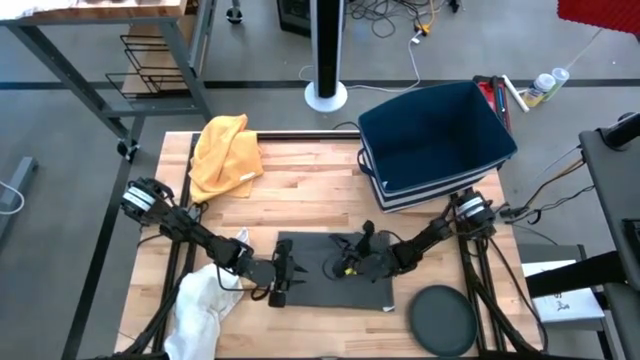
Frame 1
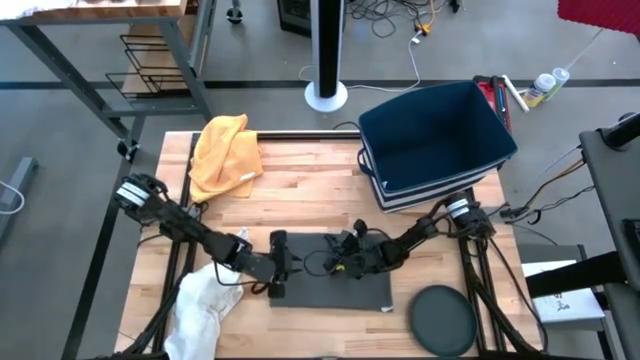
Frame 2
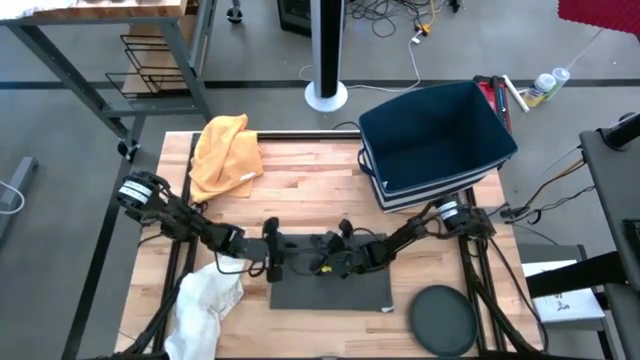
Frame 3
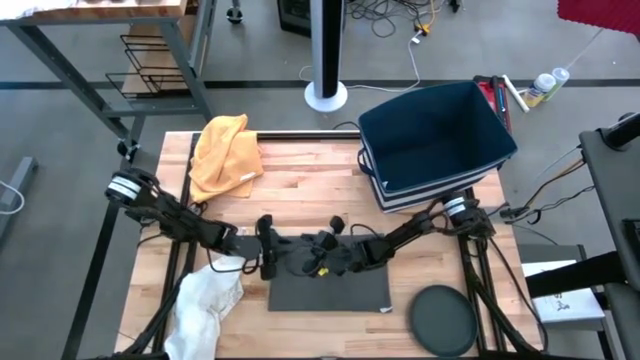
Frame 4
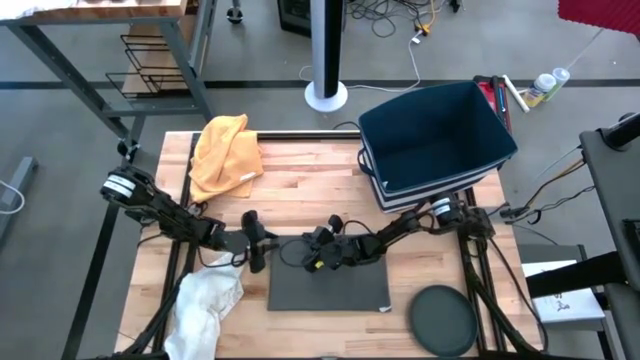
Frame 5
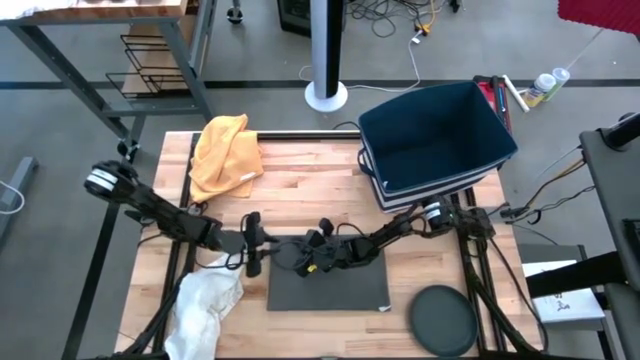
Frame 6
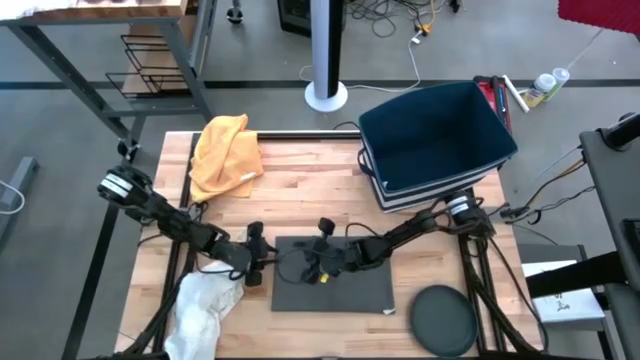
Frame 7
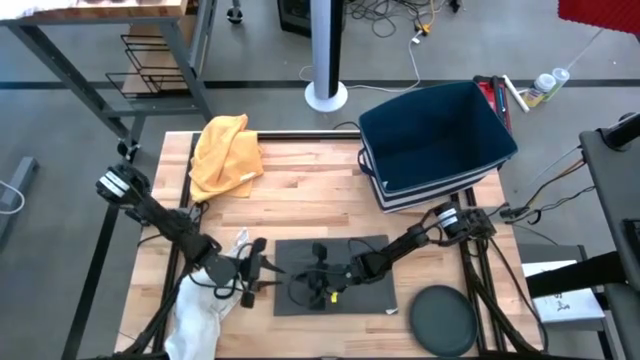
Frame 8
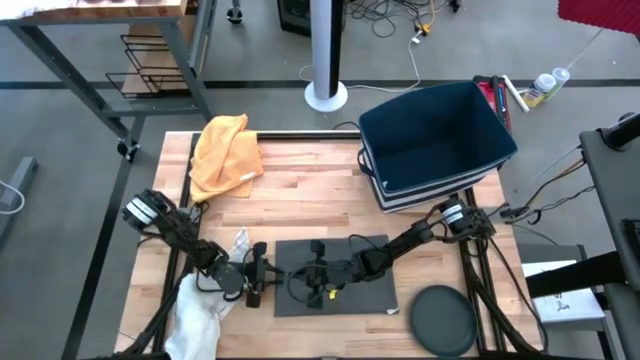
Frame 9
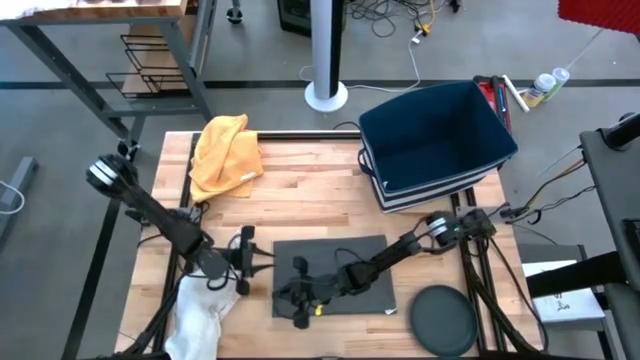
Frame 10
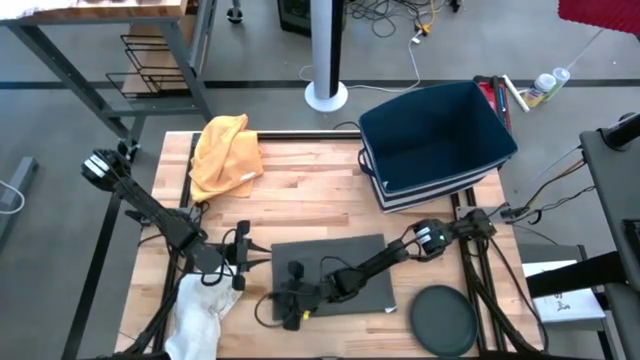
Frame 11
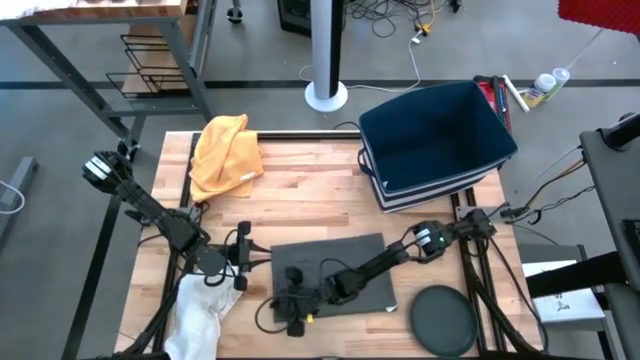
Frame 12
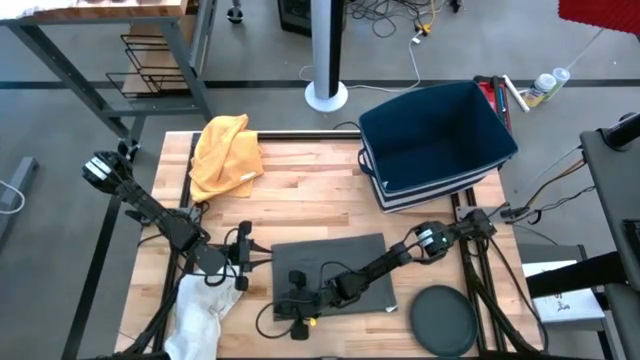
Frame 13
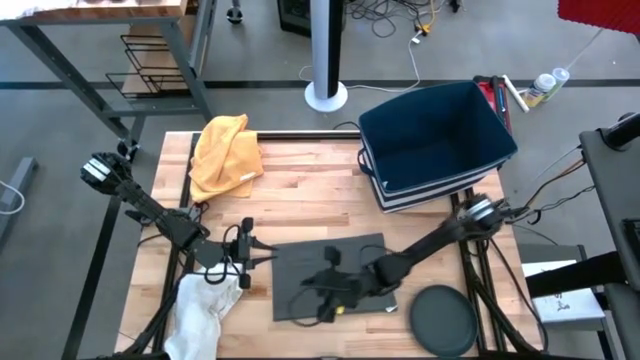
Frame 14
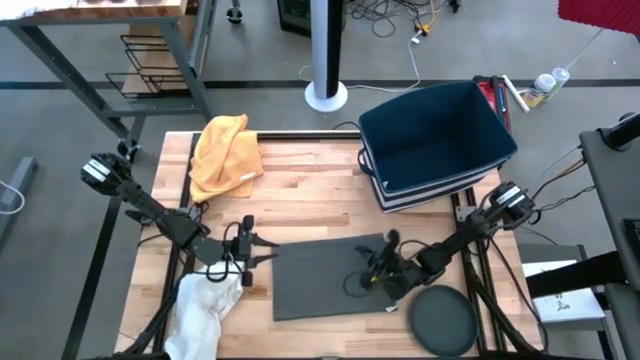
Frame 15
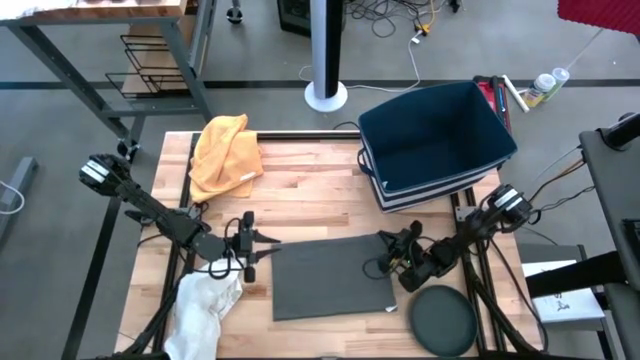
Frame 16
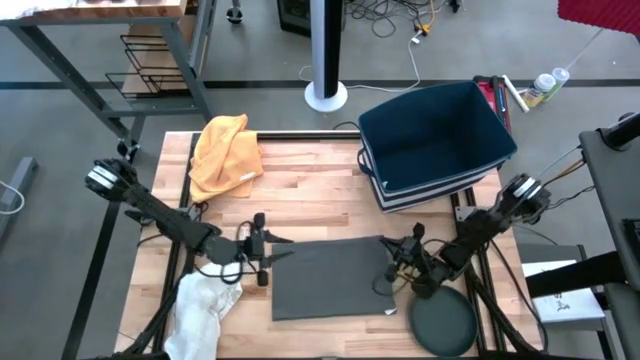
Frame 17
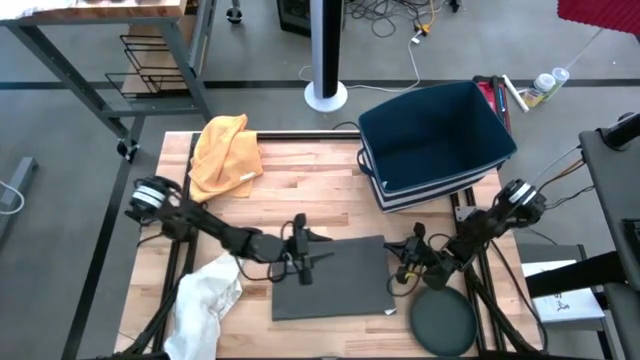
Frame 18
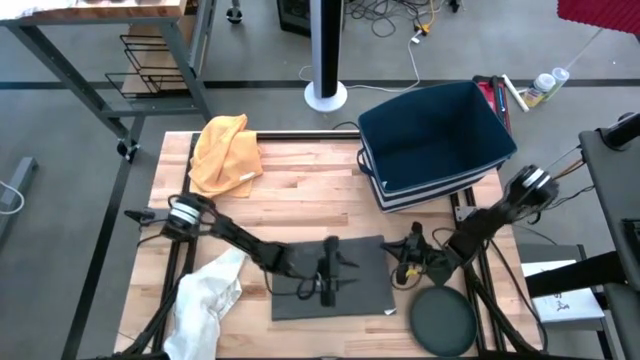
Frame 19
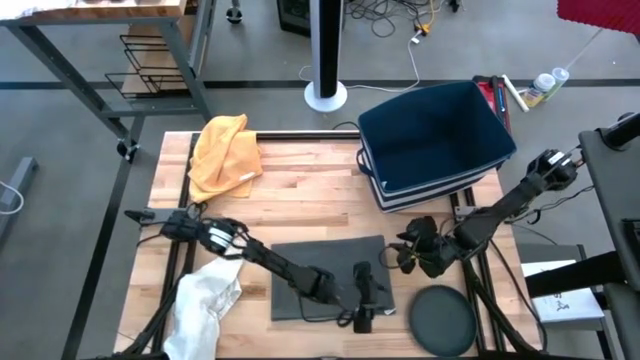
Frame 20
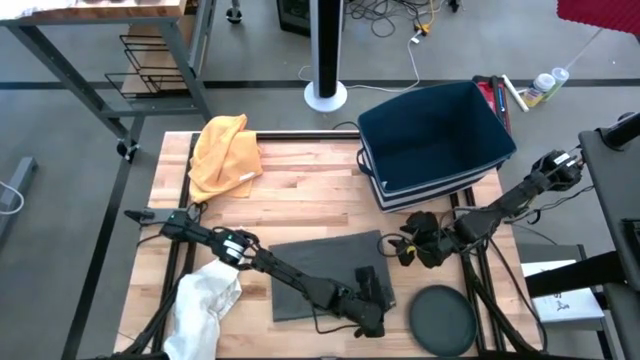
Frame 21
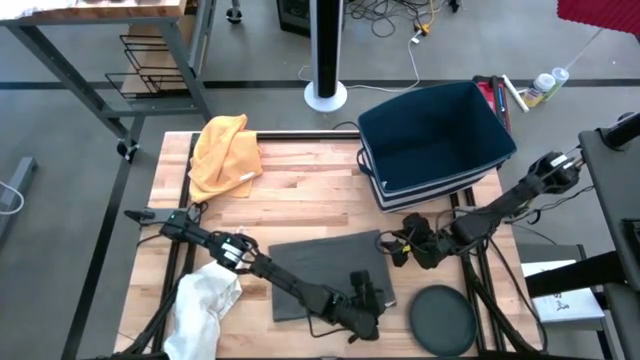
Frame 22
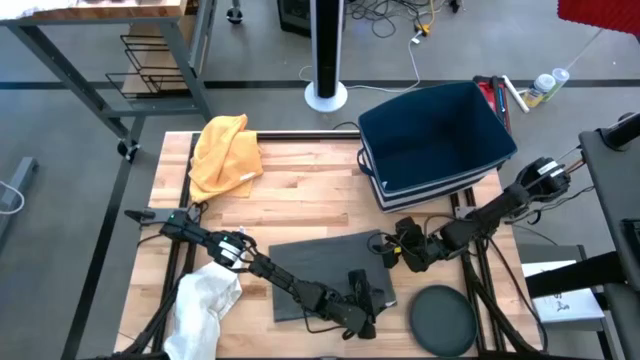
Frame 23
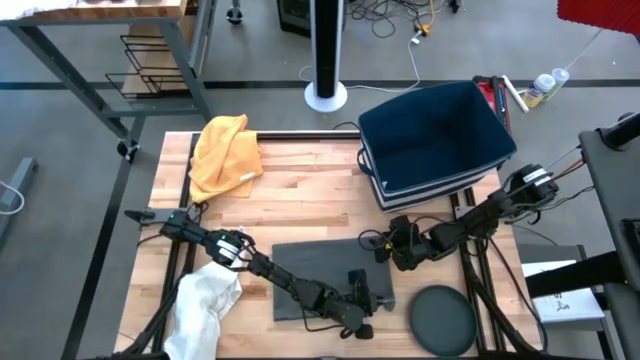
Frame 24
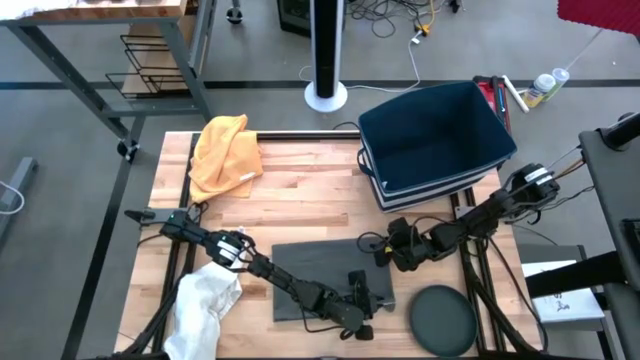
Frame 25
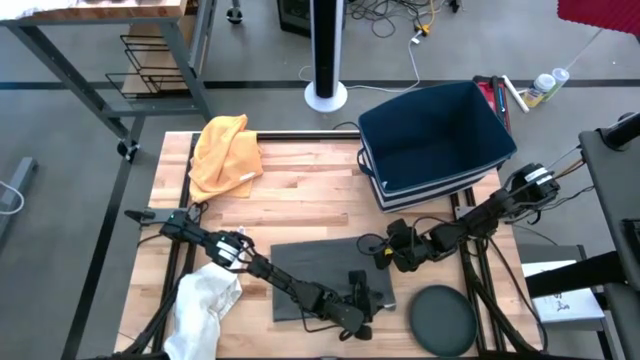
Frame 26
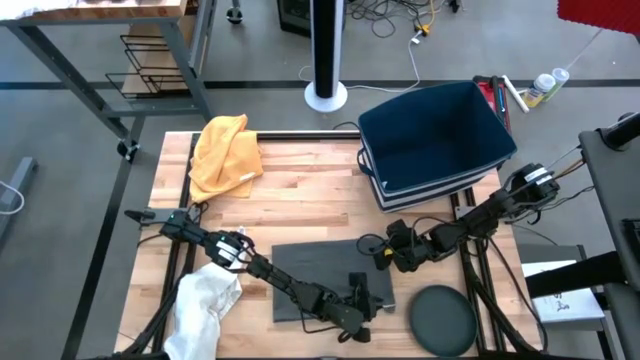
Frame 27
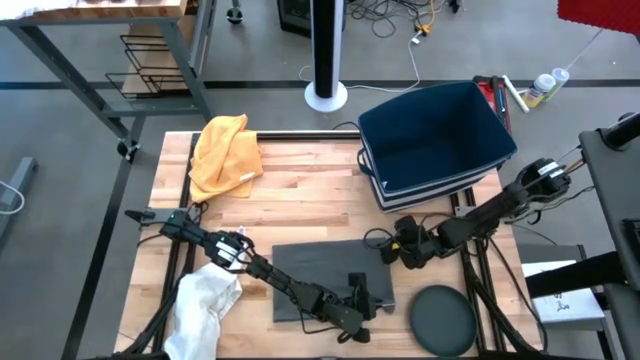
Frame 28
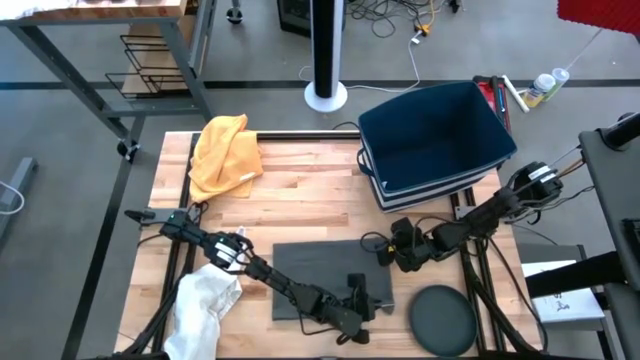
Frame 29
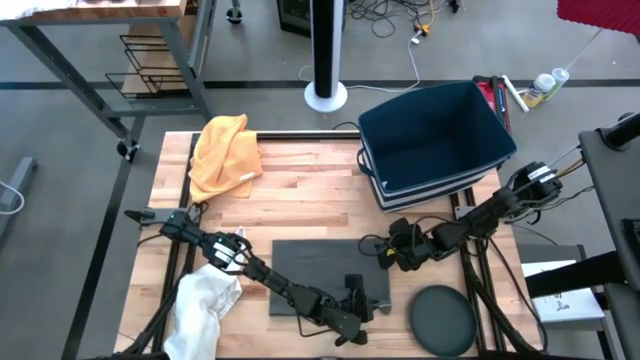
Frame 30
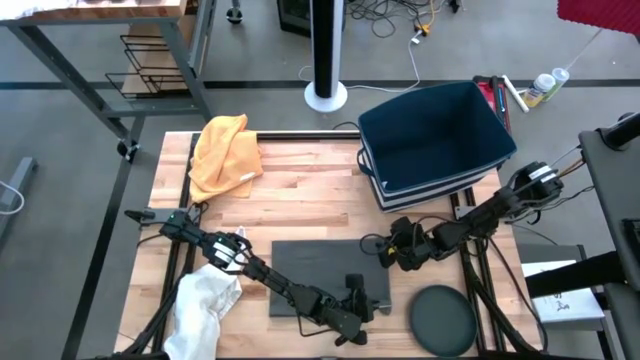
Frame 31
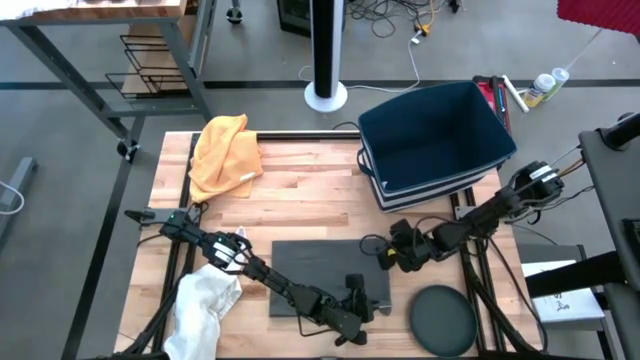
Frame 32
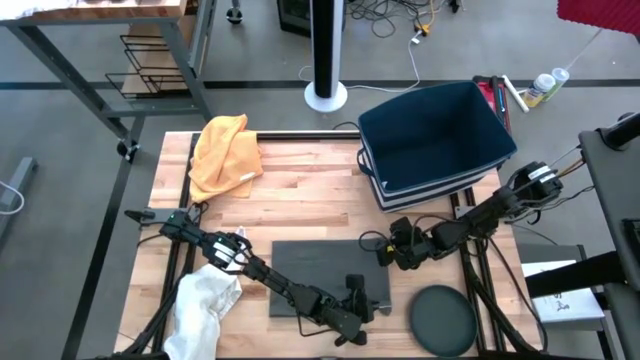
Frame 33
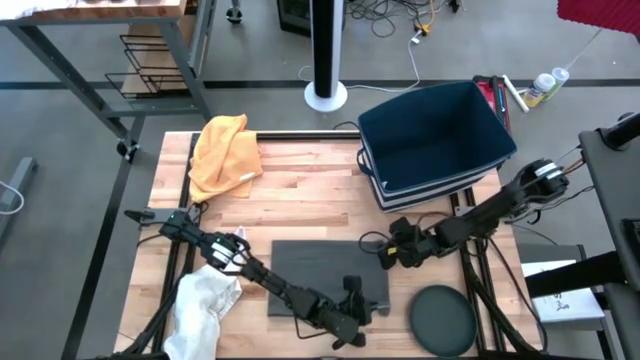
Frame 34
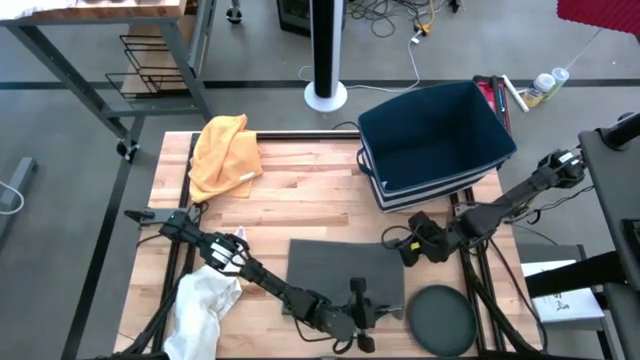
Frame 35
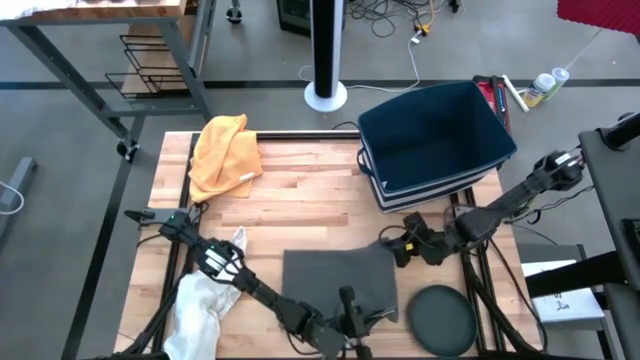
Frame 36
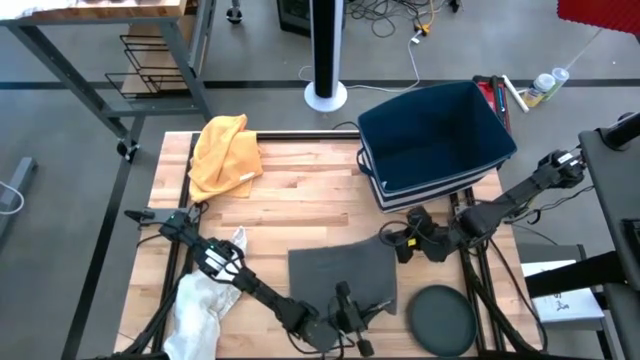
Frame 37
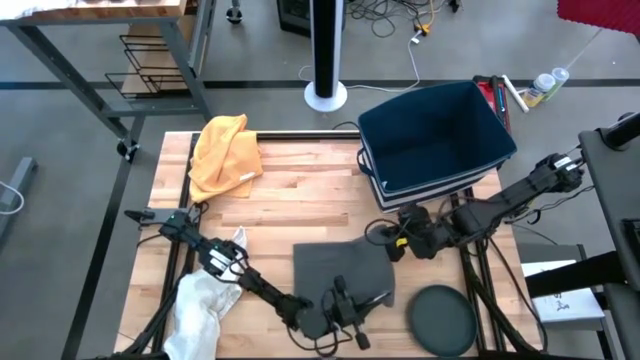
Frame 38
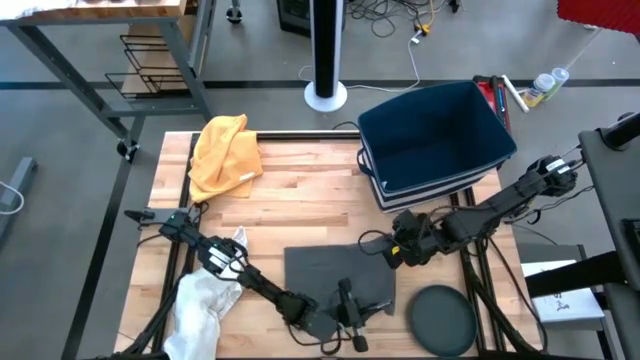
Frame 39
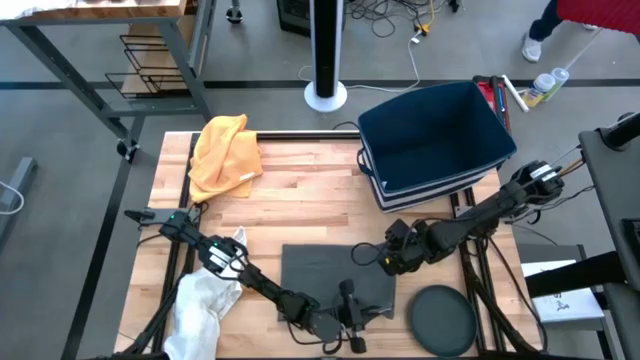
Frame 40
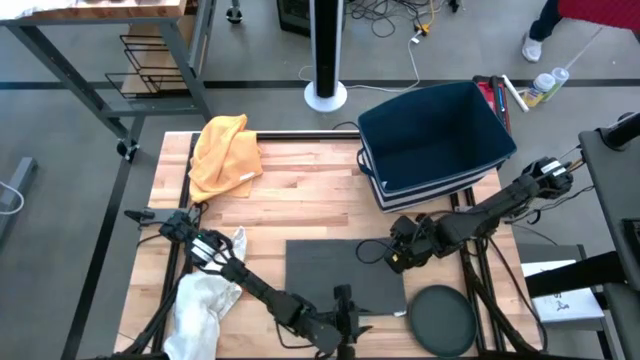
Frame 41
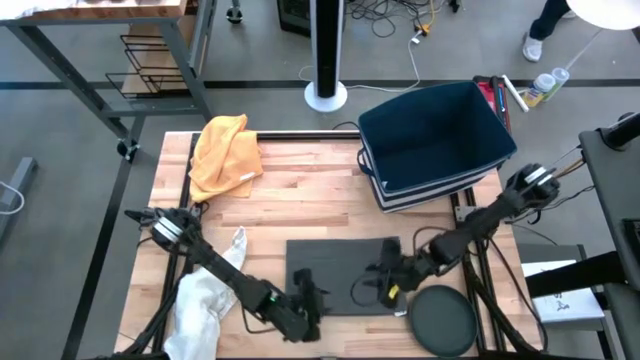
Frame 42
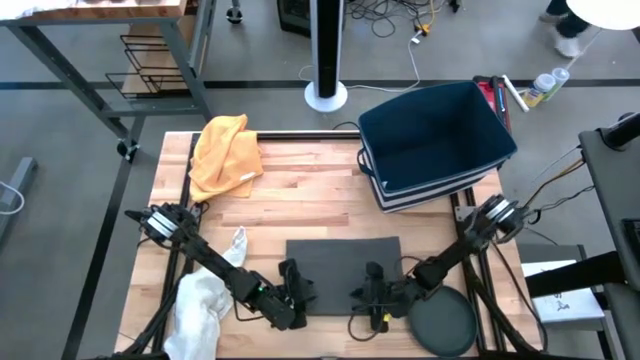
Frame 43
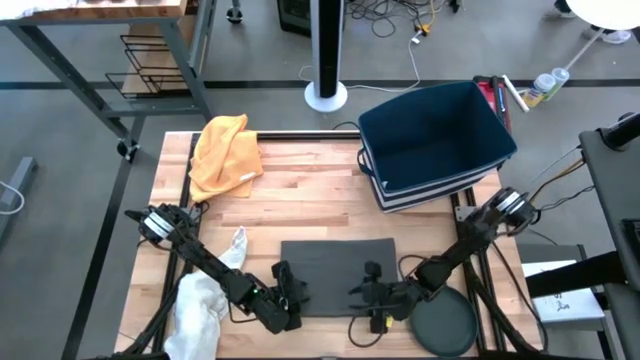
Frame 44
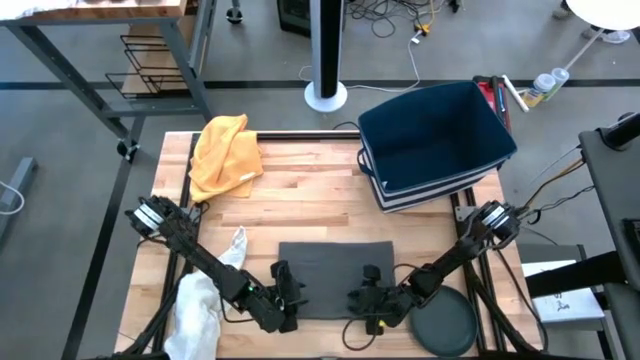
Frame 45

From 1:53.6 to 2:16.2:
Task: Fold kitchen towel into neat rectangle
Fold the gray towel
